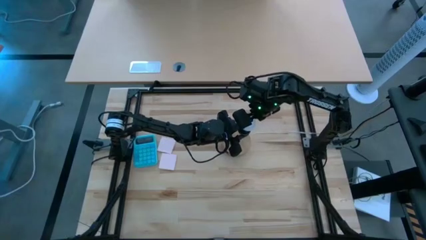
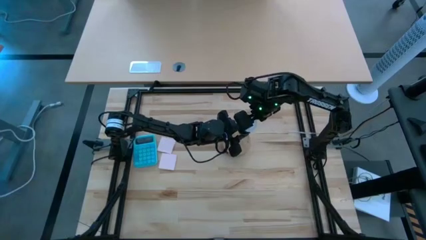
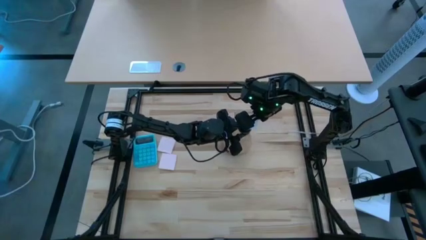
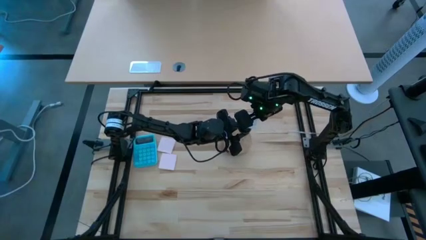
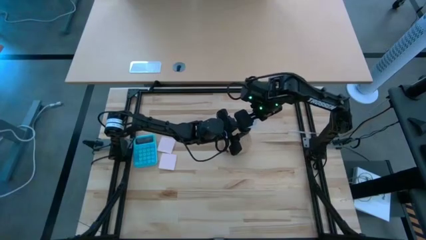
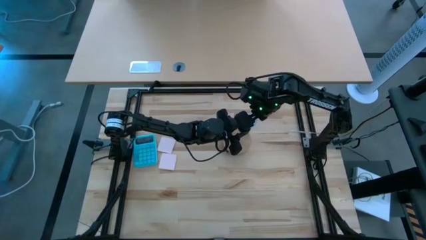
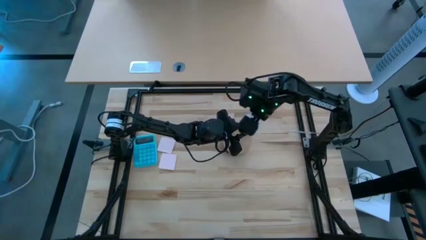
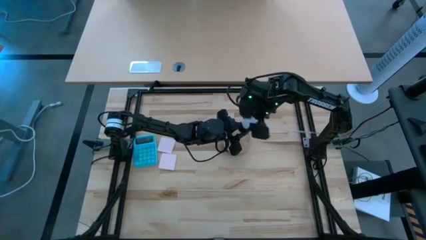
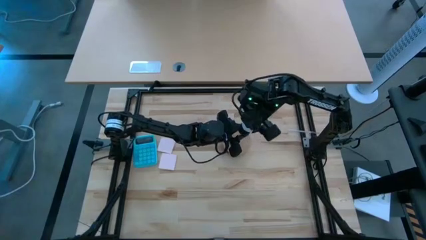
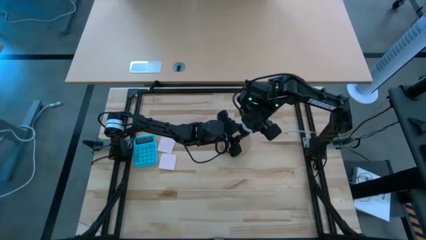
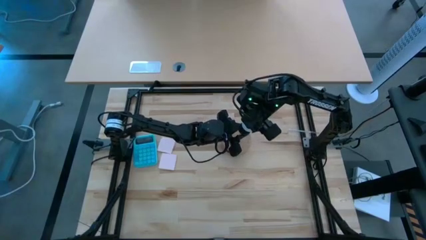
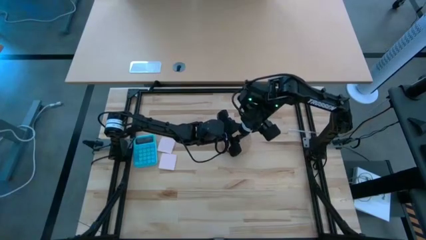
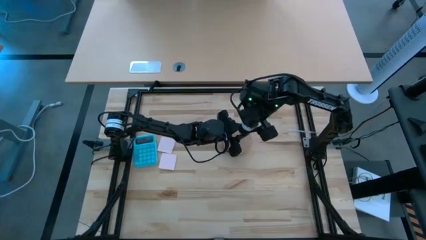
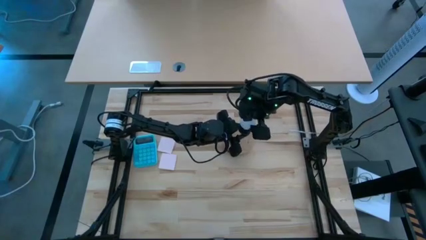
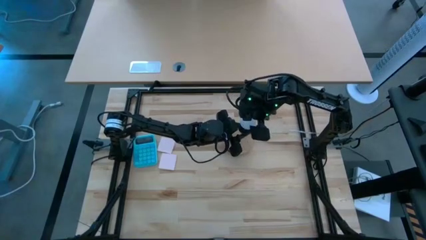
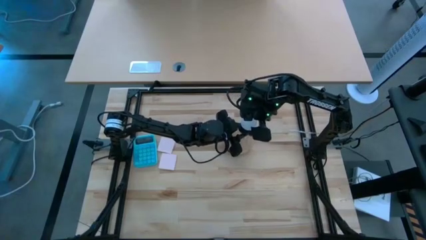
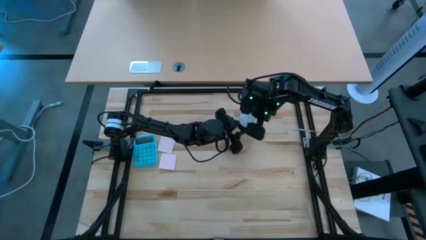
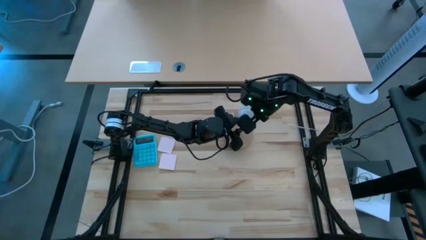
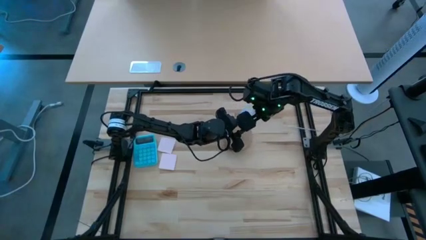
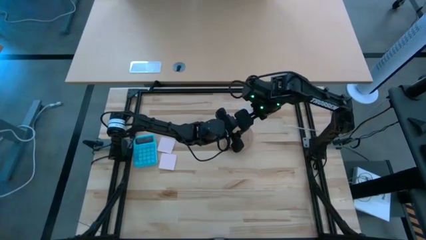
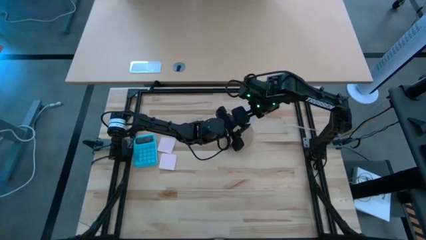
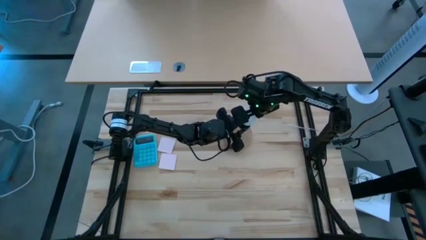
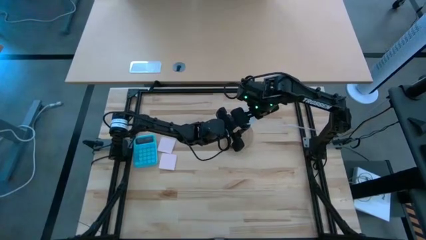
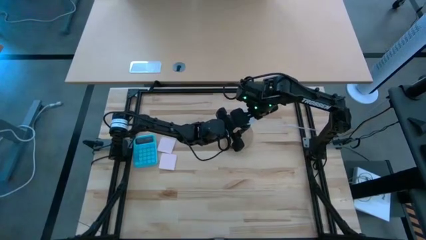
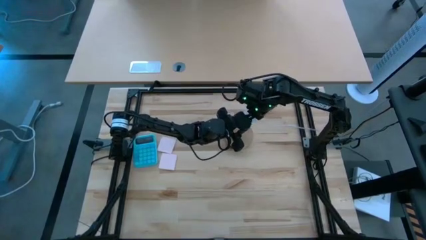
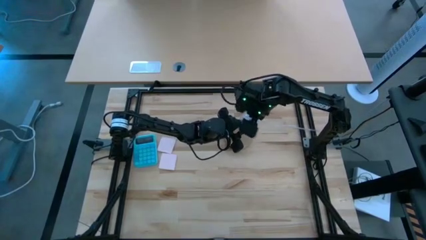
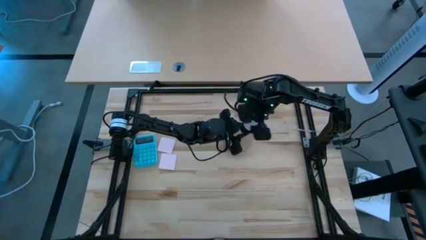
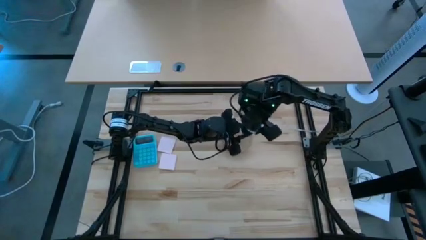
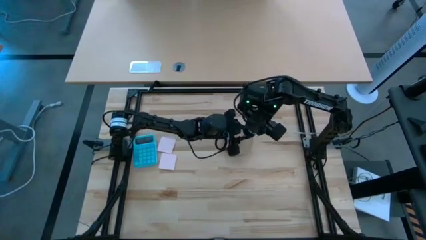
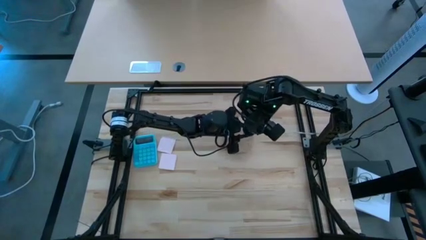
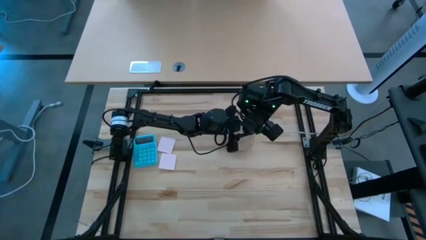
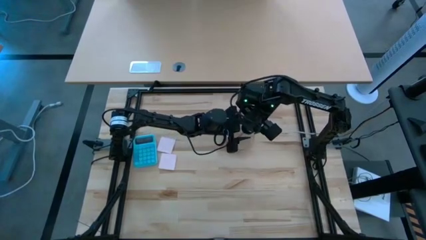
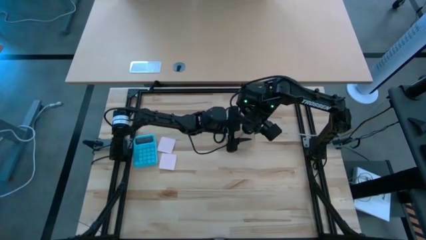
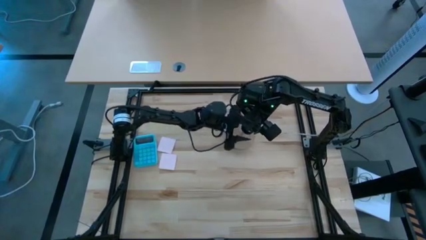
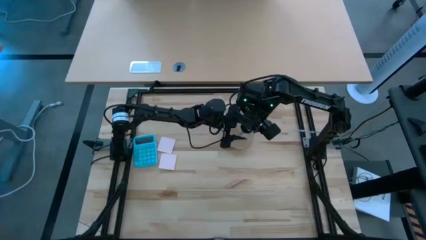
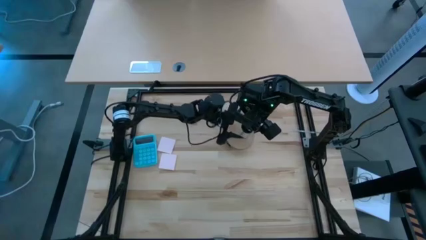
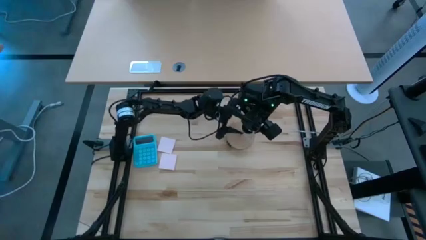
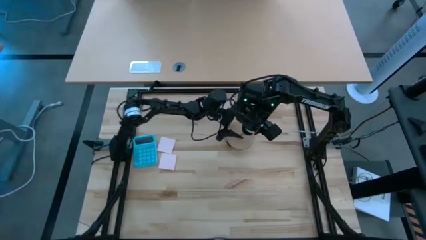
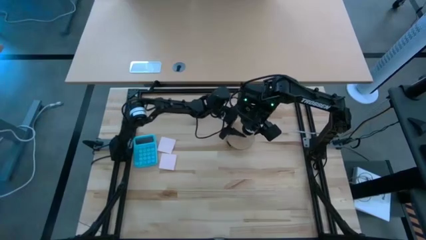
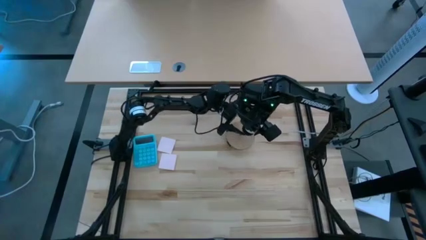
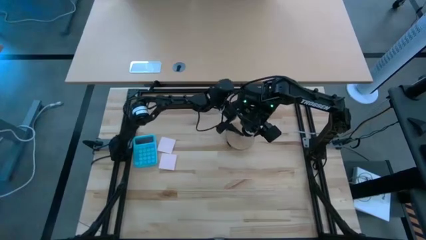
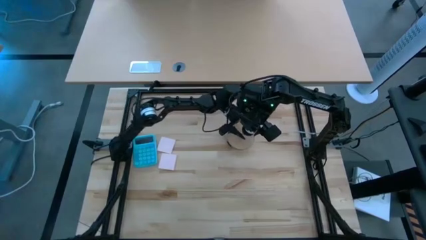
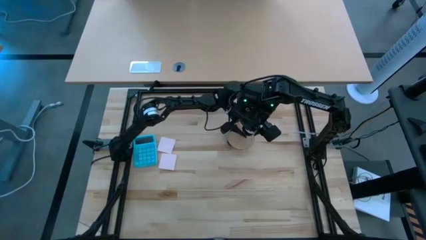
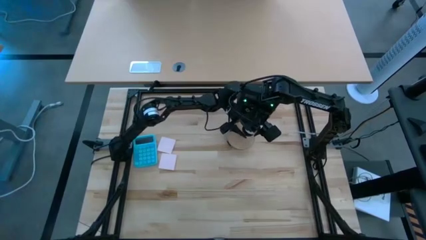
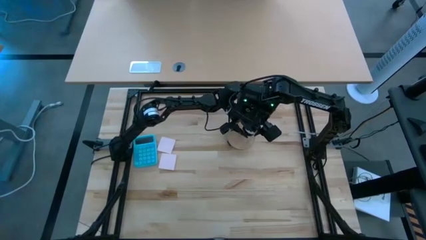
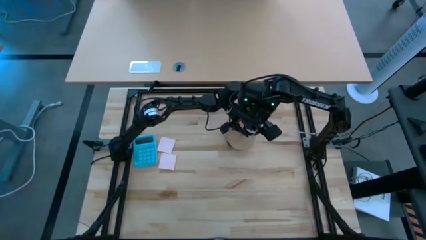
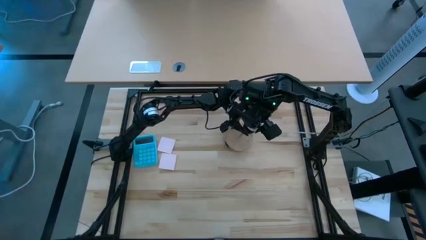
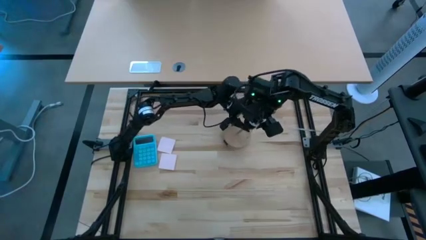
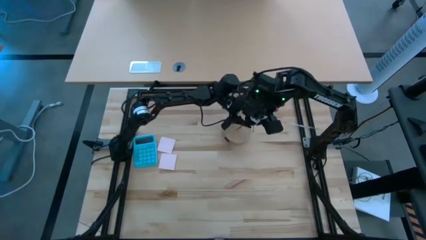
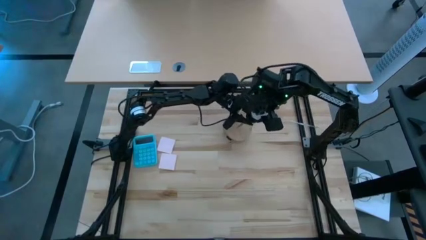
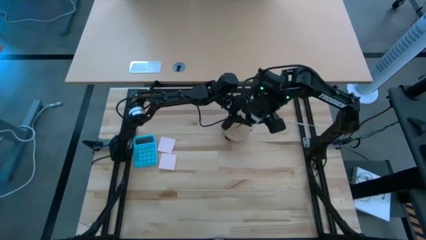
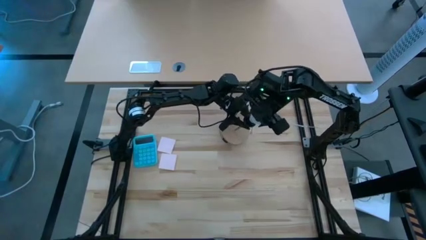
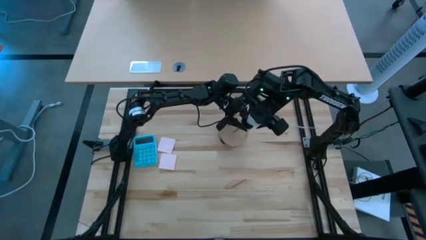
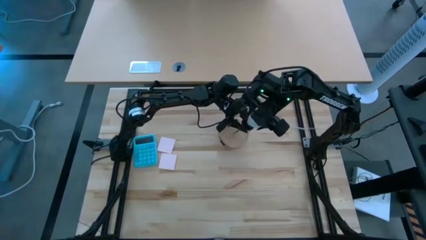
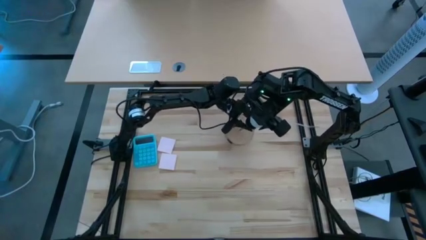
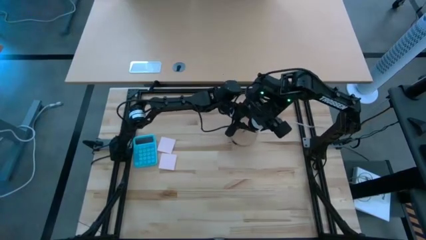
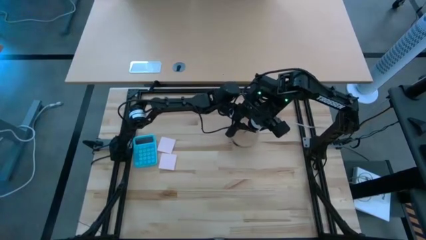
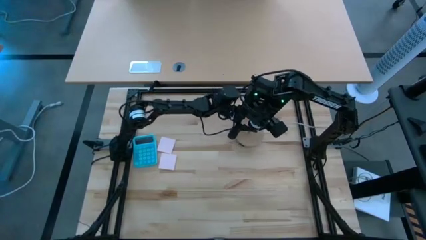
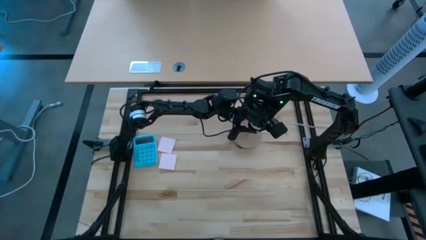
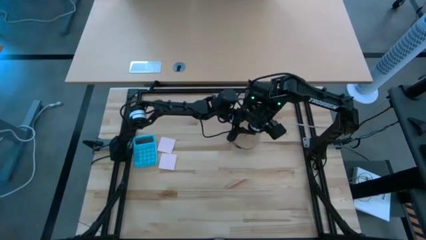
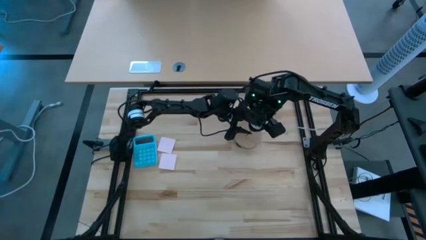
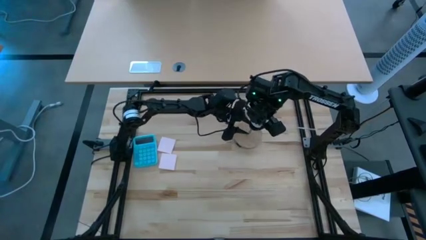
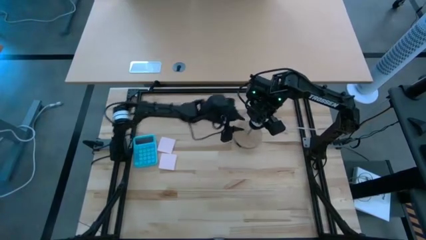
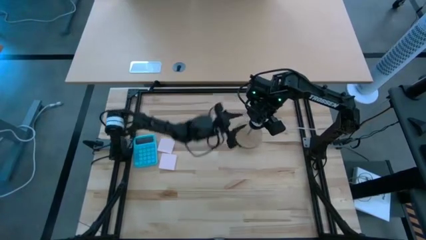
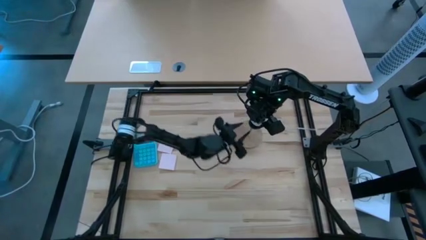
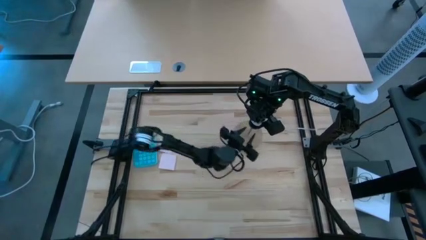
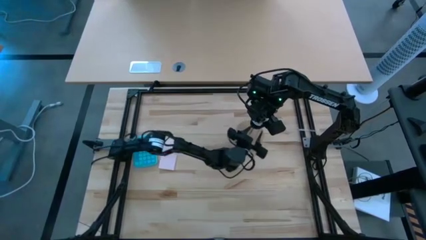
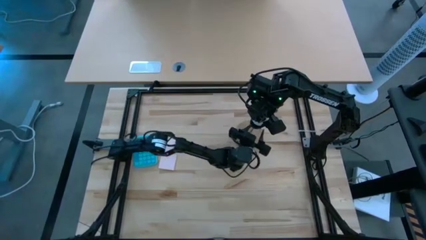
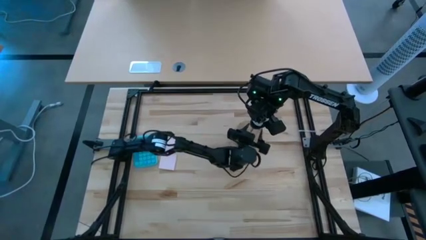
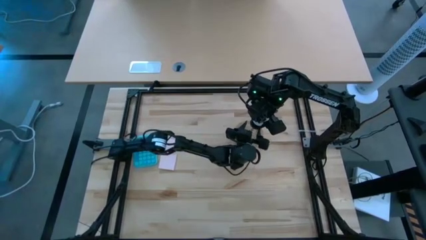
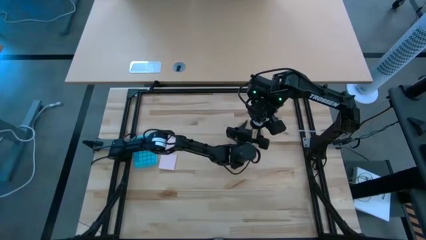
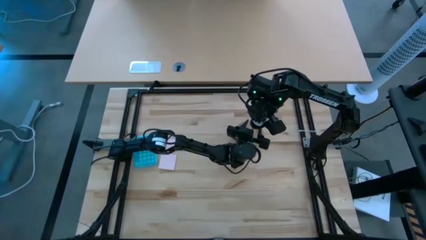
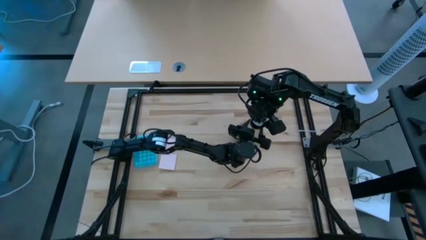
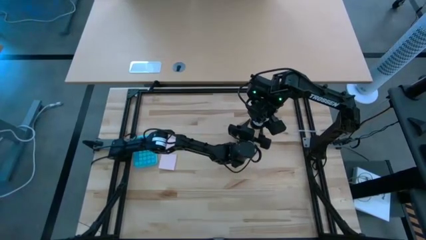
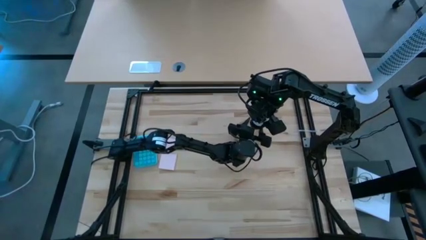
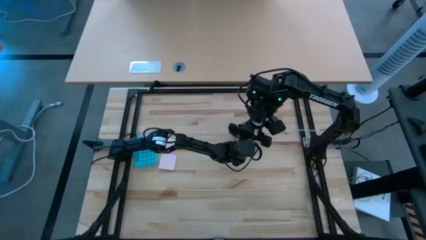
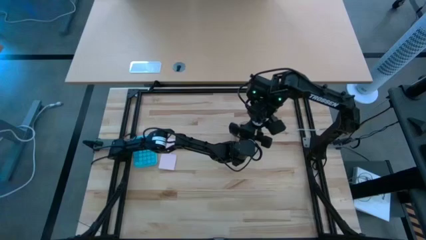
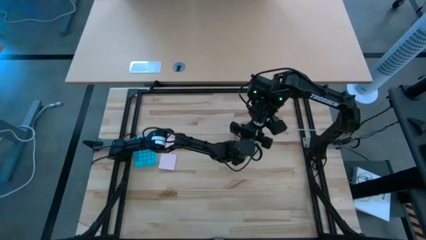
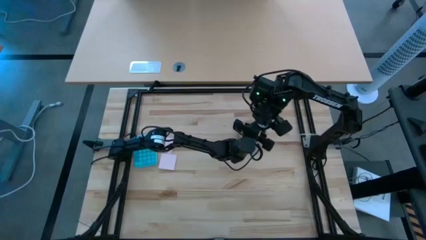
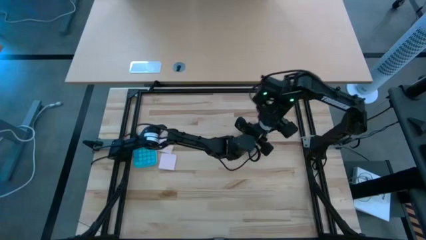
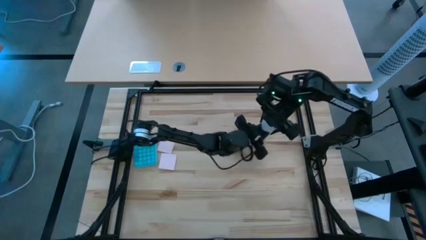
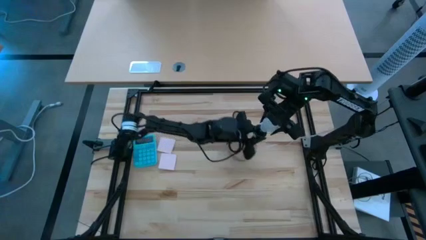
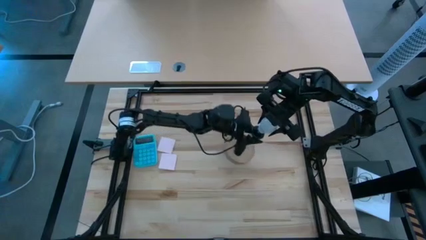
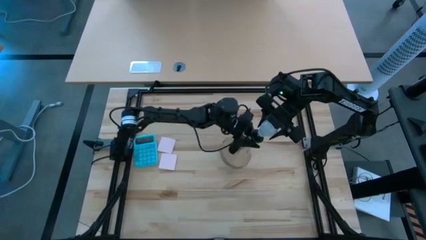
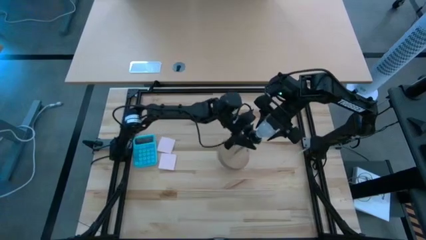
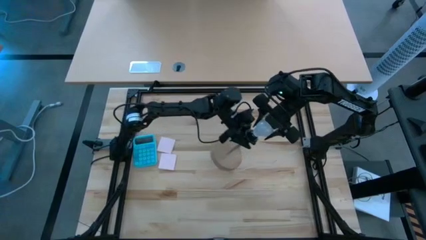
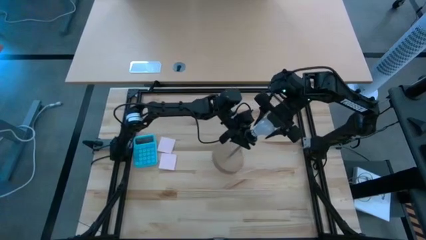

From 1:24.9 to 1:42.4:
Task: Screw lightbulb
Remove the lightbulb from the lamp
